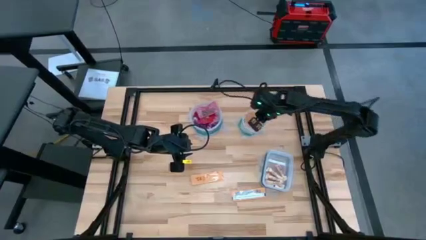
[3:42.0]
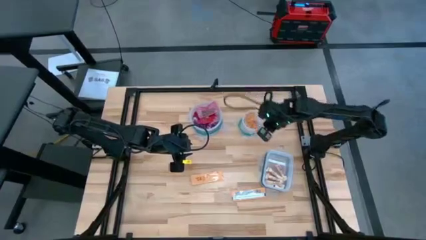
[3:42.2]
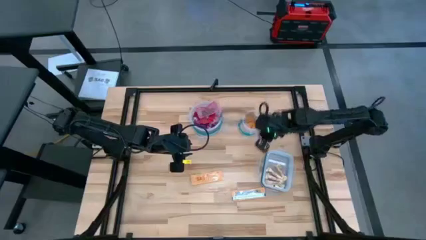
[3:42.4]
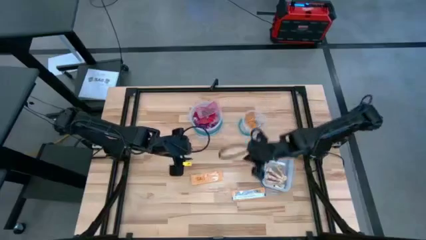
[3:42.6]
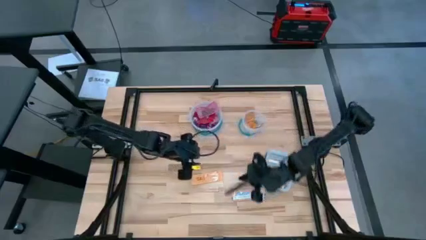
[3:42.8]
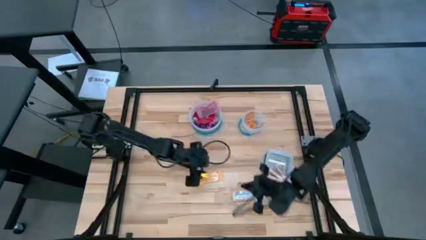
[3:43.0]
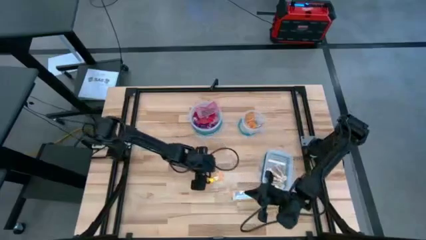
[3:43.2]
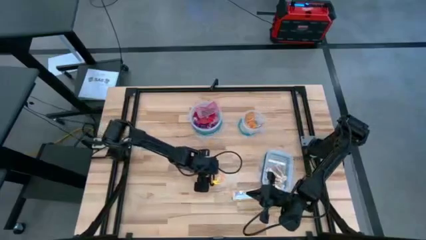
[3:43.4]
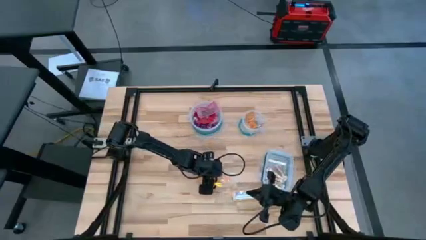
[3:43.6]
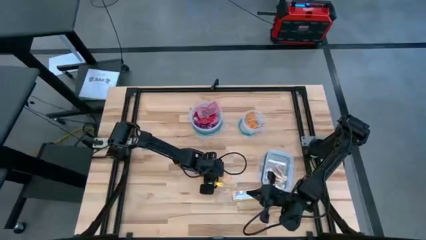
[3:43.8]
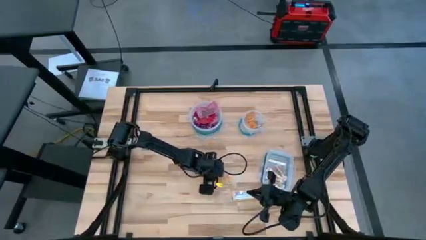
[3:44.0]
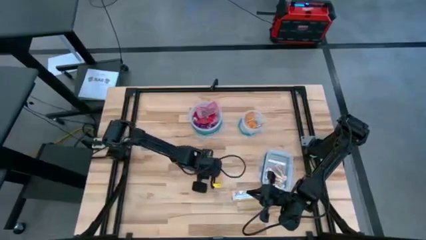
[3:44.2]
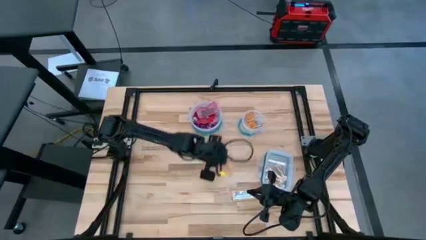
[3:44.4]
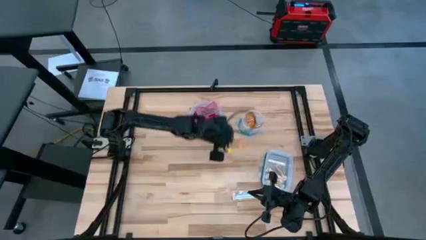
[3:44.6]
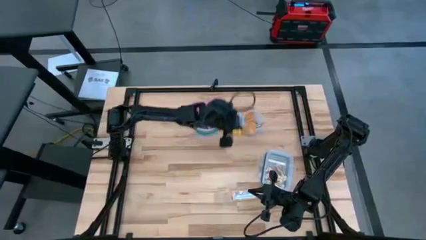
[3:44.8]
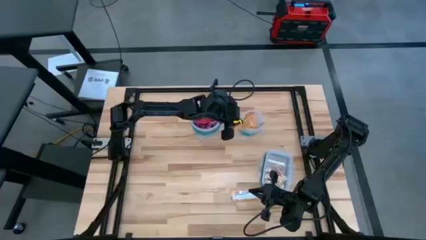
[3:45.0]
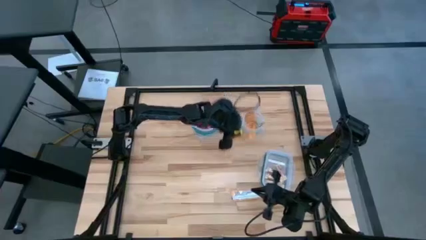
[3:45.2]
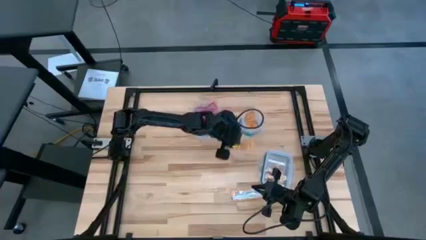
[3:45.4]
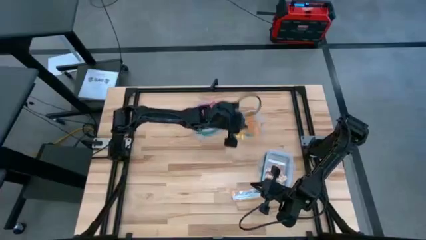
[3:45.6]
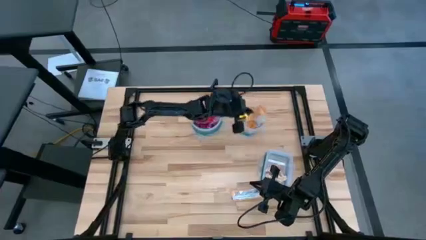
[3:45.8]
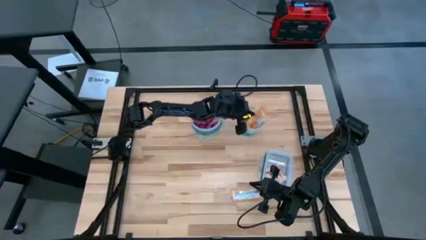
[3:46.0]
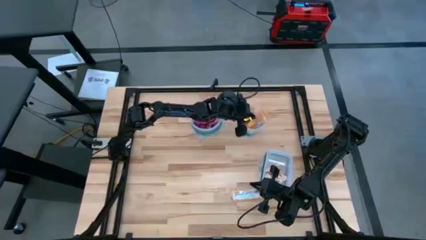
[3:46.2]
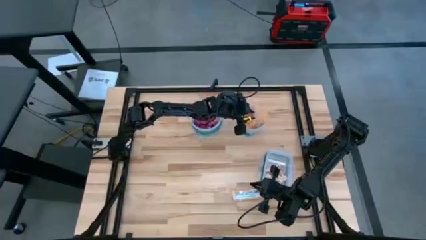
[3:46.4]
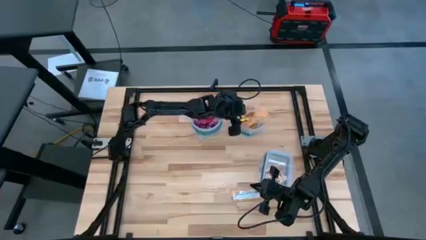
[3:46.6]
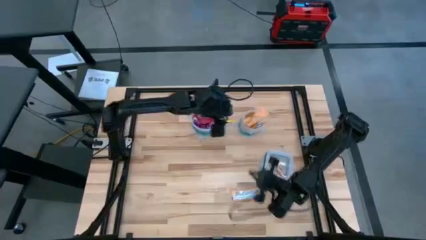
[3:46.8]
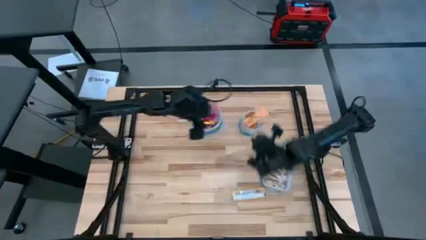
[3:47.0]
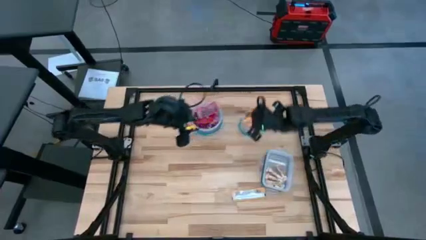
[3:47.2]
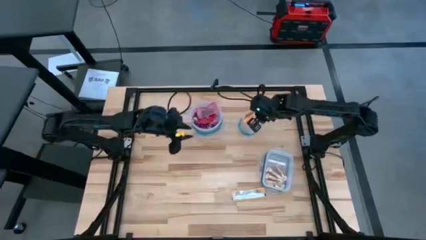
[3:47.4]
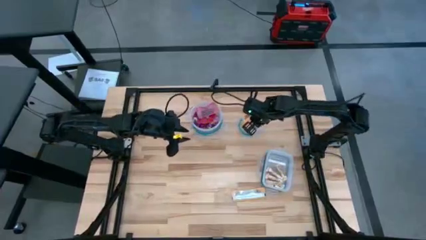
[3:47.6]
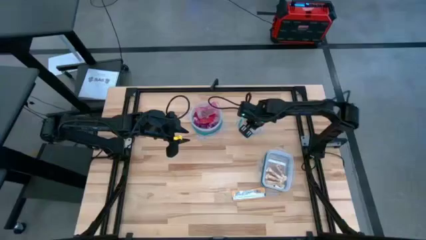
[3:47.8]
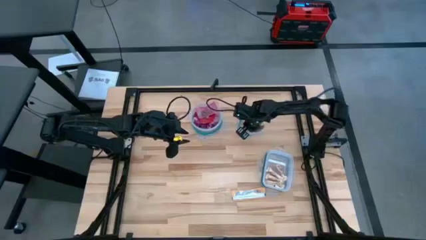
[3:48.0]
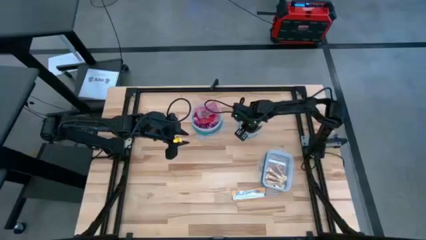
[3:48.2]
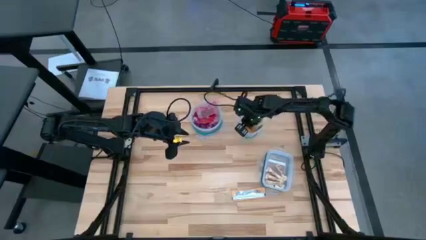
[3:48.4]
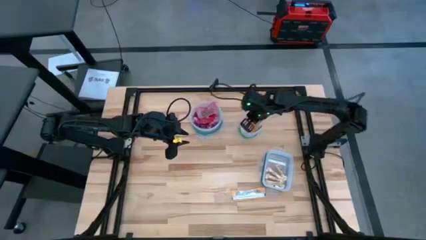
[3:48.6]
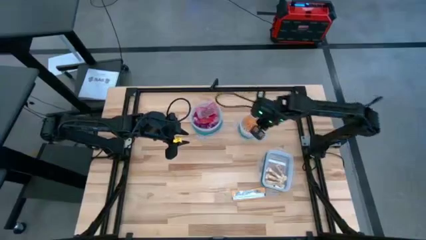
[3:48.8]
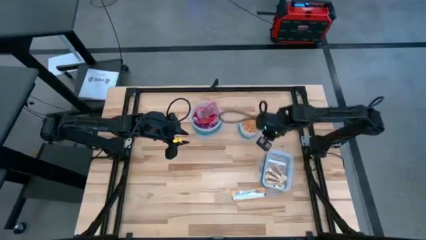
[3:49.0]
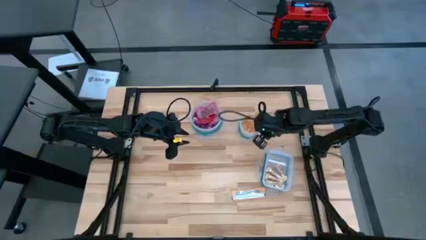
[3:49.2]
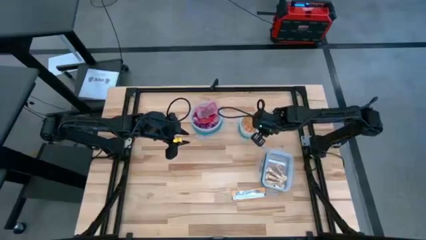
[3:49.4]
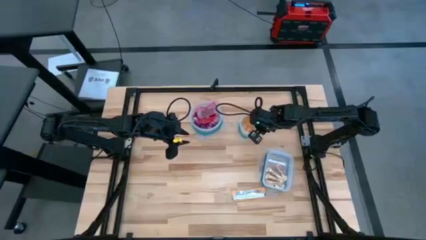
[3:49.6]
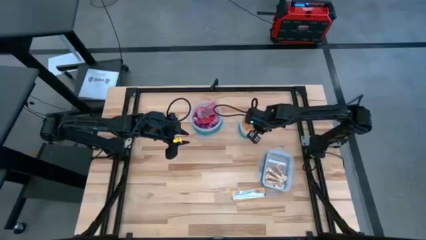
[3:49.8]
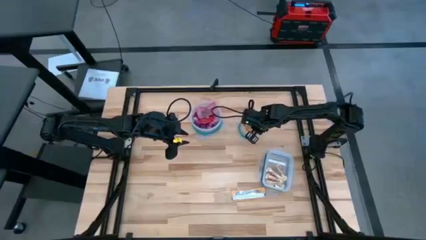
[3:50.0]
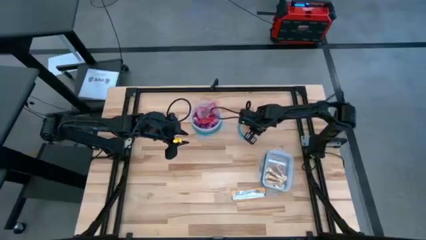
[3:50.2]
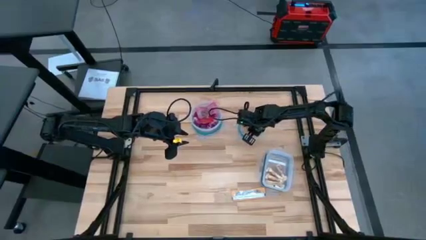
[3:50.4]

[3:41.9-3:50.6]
Task: Sort candy
Put the yellow candy strip into the small circular transparent bin

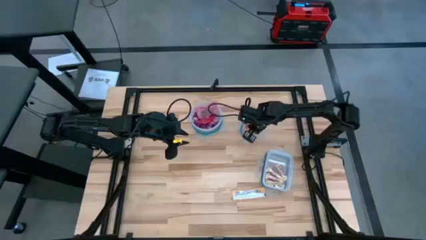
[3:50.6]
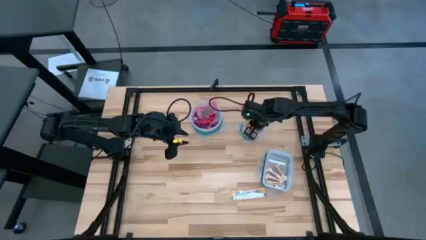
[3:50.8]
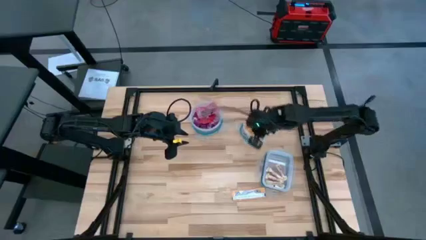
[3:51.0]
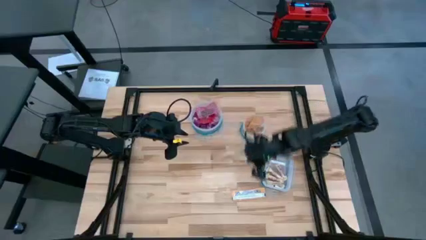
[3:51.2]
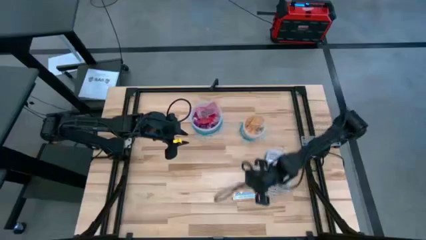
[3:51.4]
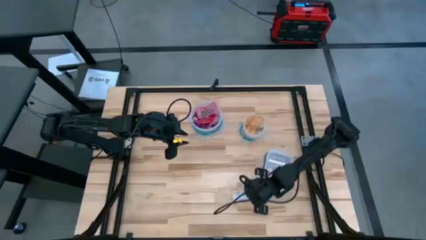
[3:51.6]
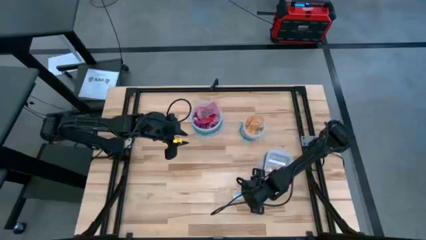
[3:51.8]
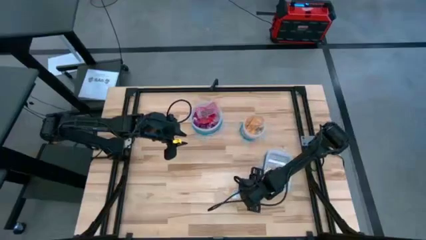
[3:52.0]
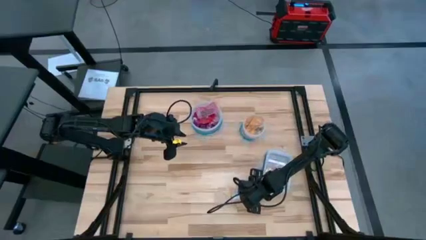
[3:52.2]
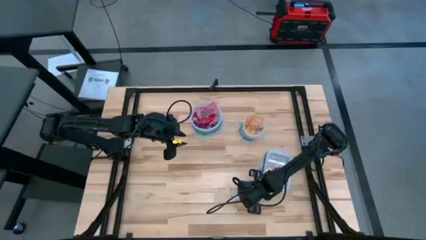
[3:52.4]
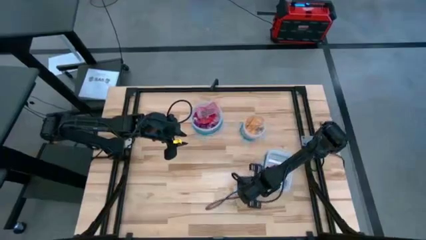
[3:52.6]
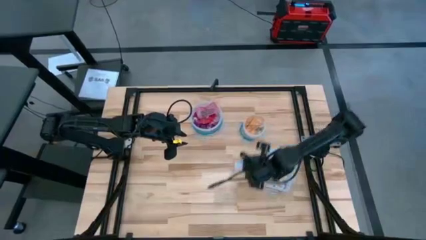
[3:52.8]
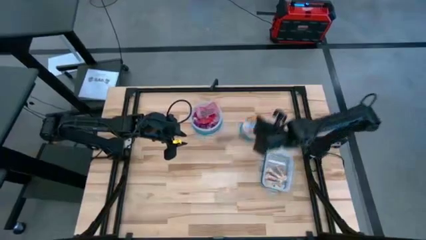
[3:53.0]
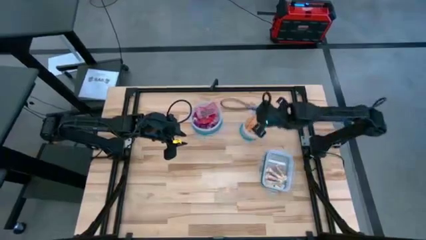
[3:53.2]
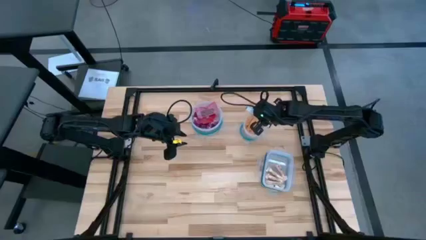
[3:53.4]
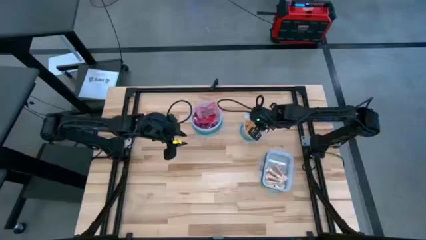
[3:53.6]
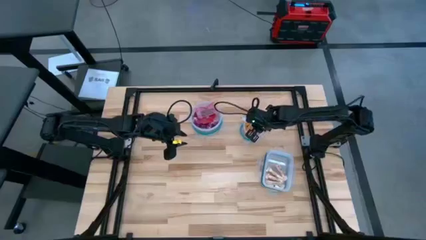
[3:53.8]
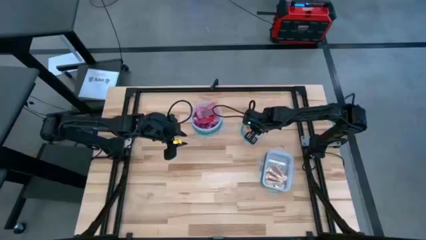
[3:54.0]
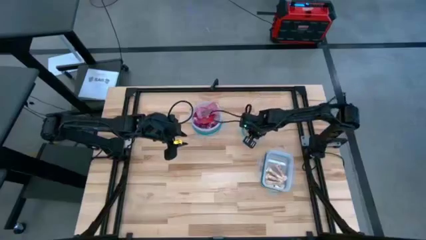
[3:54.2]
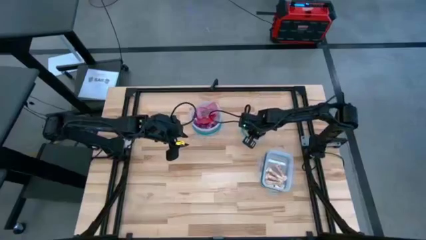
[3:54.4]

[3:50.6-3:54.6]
Put the yellow candy strip into the small circular transparent bin
